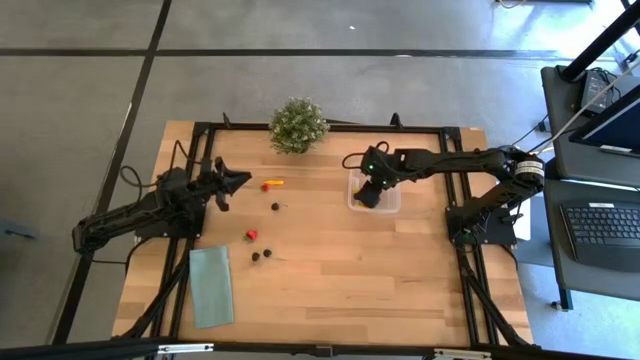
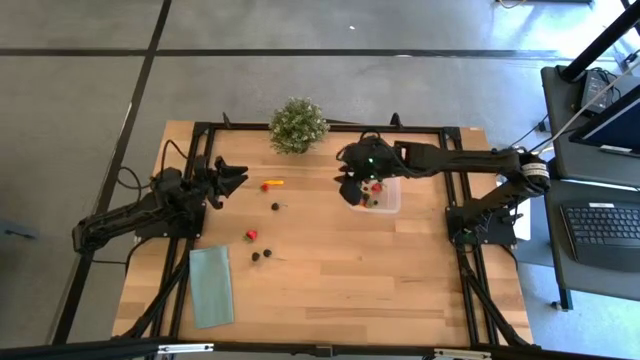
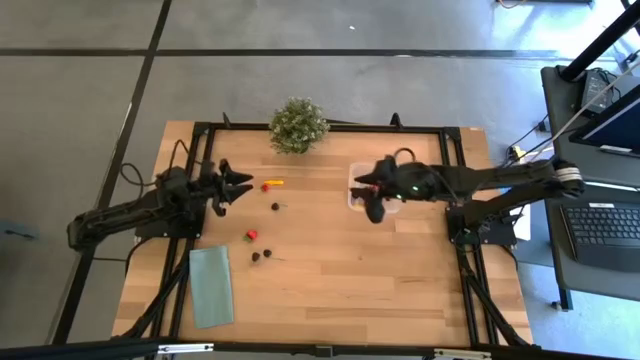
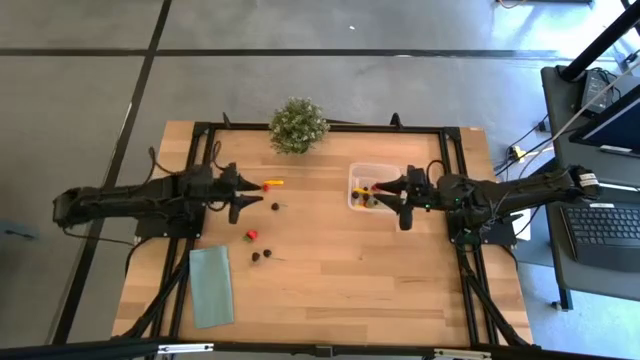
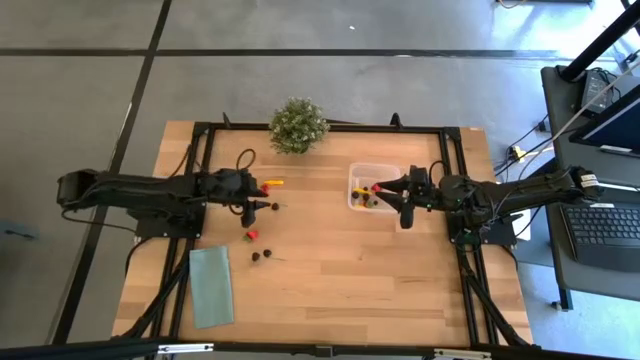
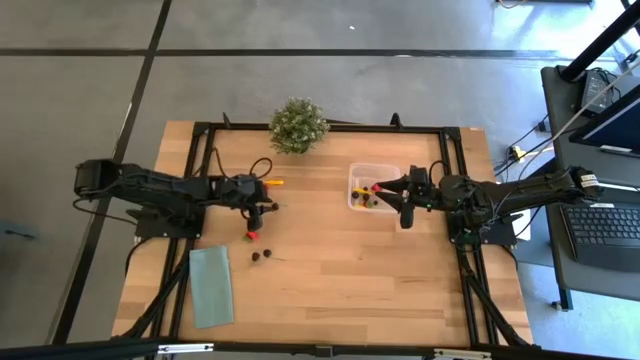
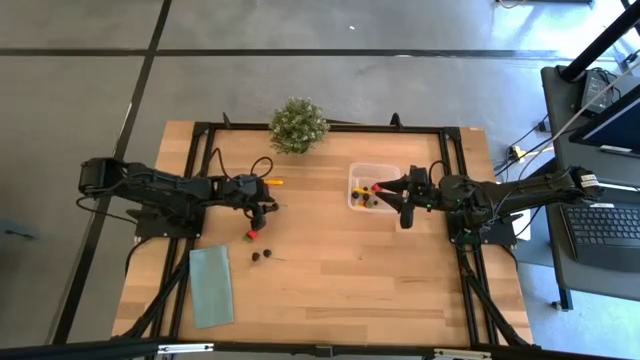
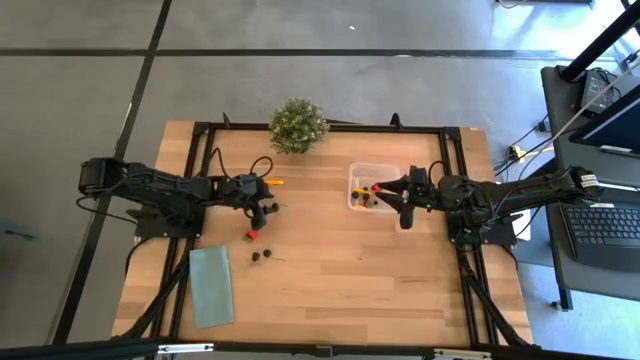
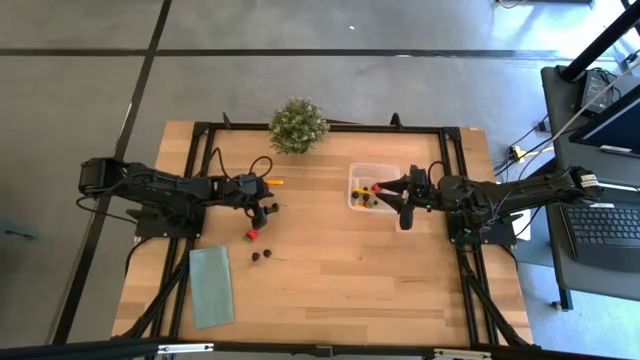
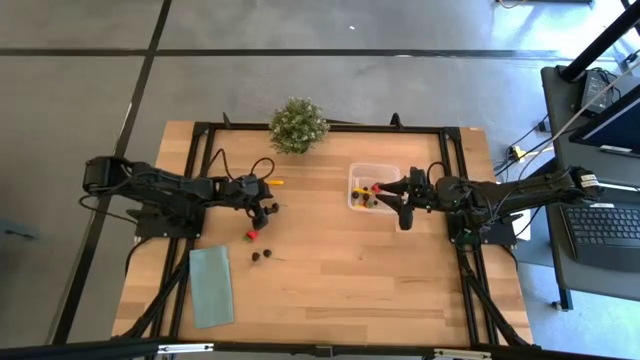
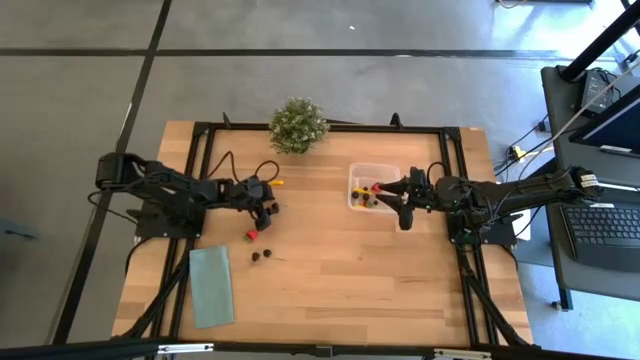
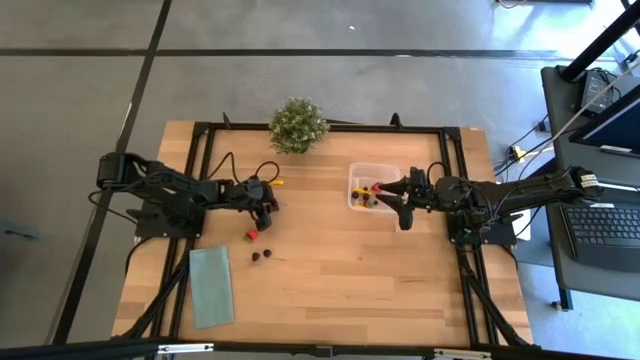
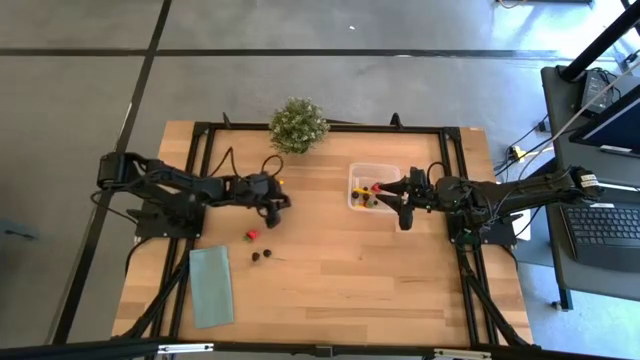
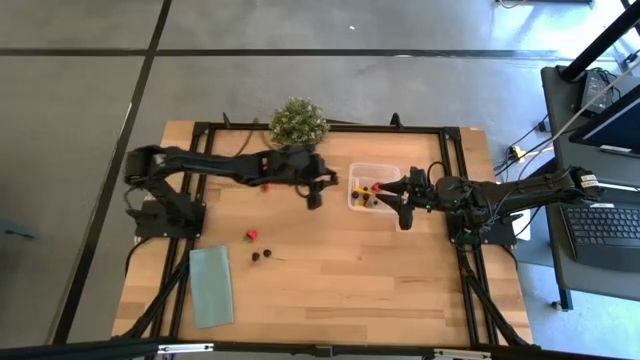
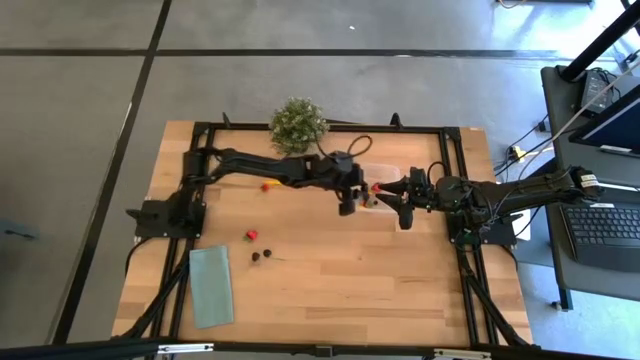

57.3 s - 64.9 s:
Task: Pick and placing Produce into tupperware
Put the top black cherry into the transparent bin

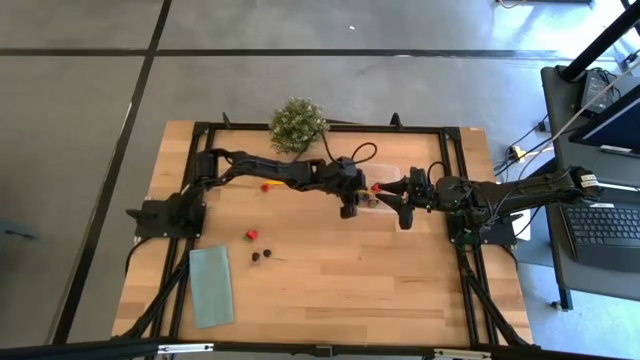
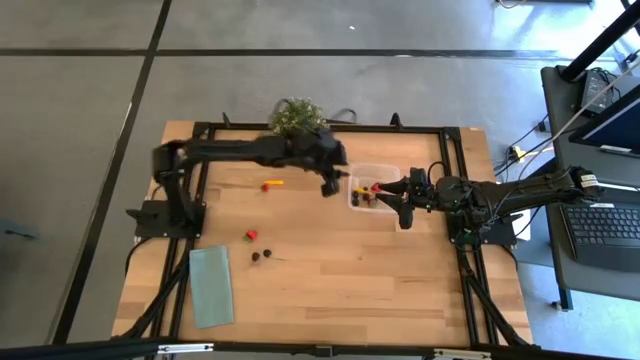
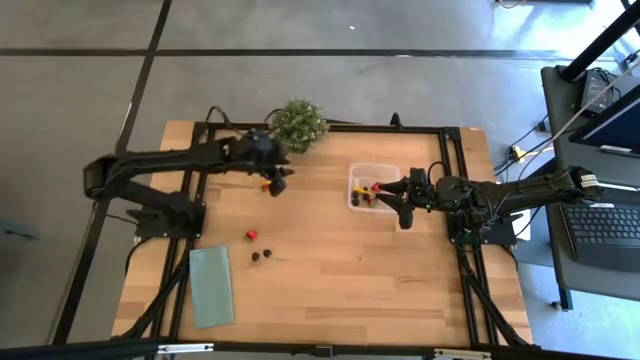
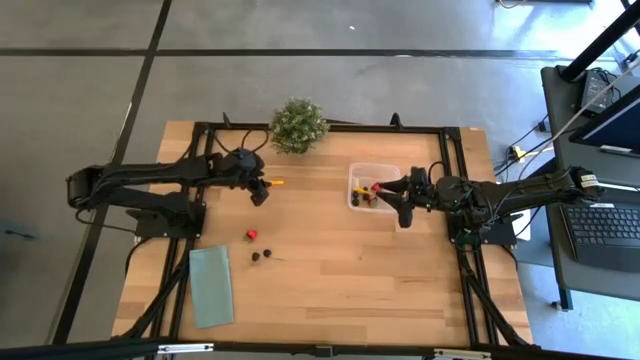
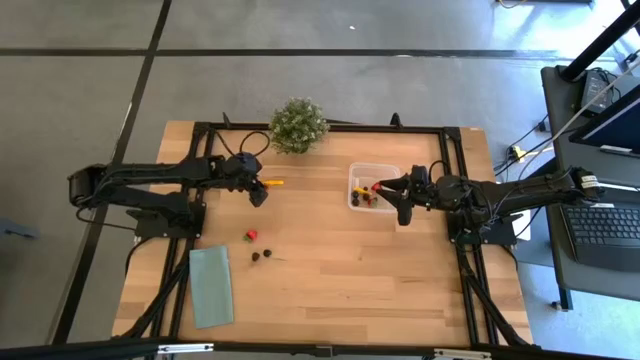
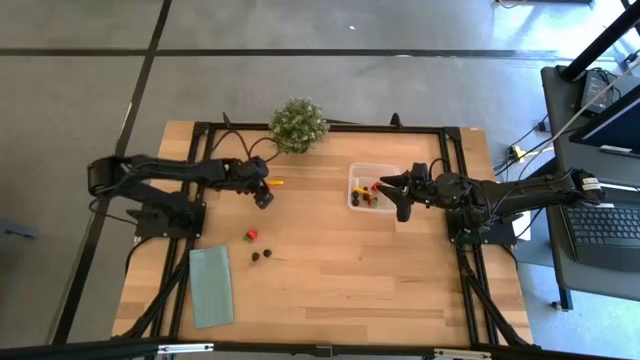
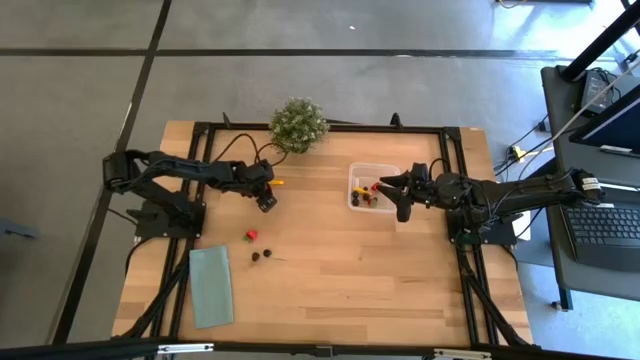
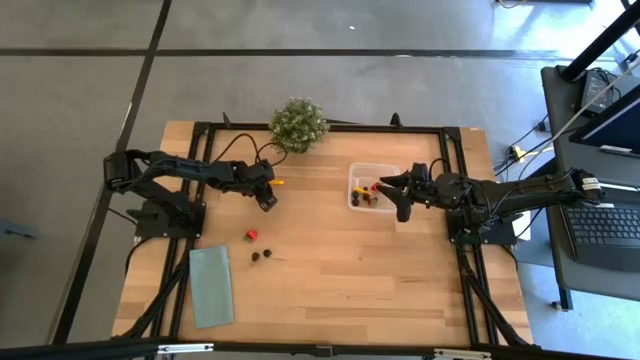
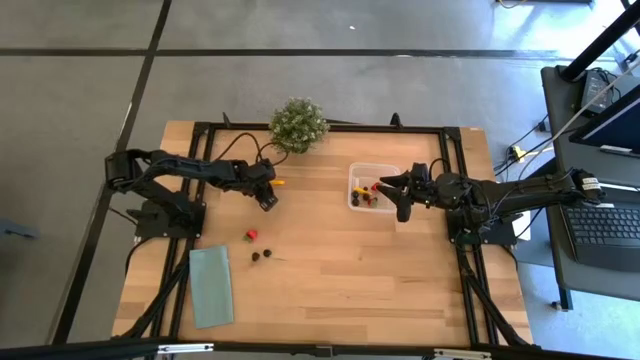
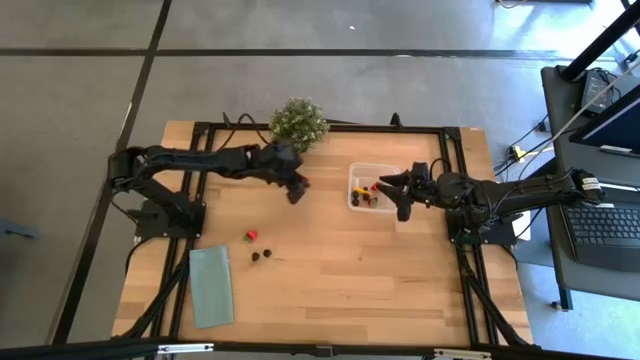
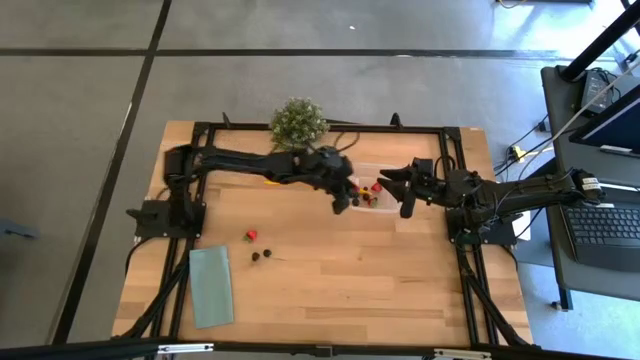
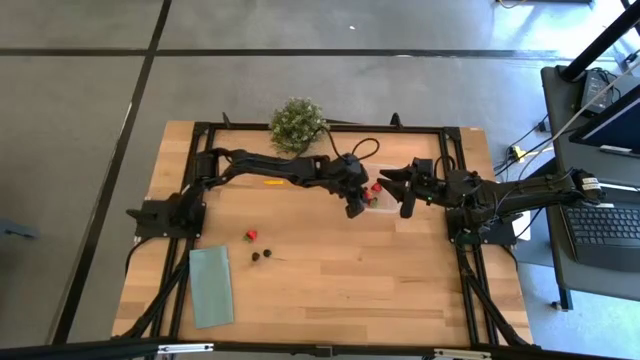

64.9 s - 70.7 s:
Put the top strawberry into the transparent bin

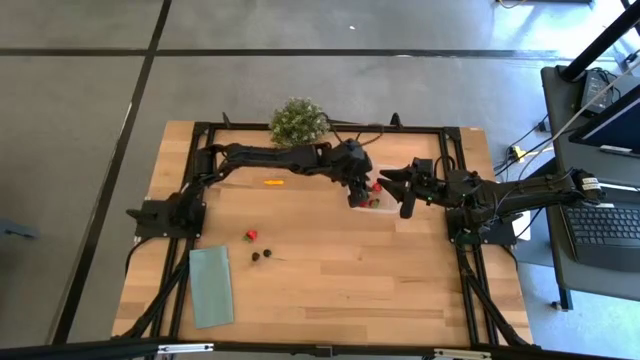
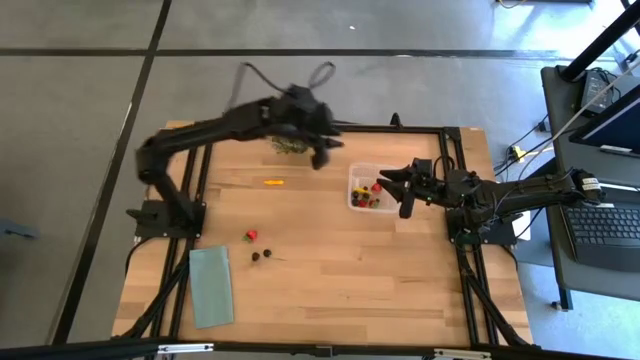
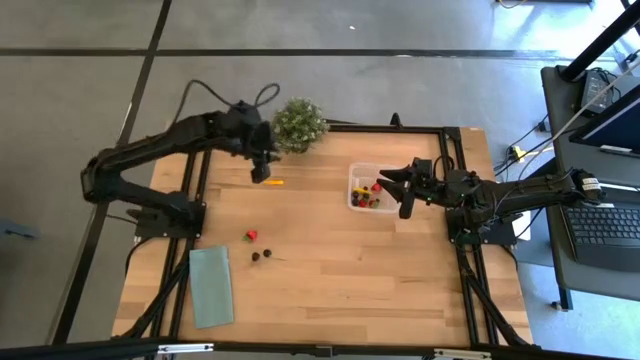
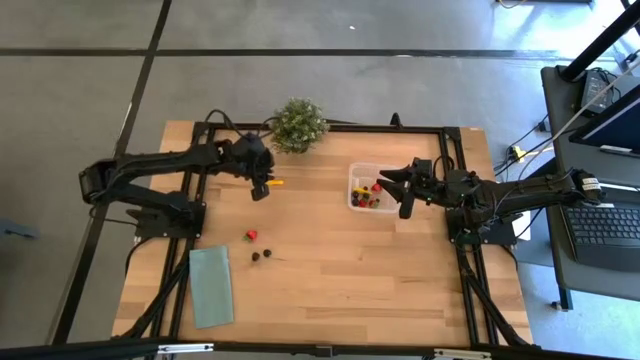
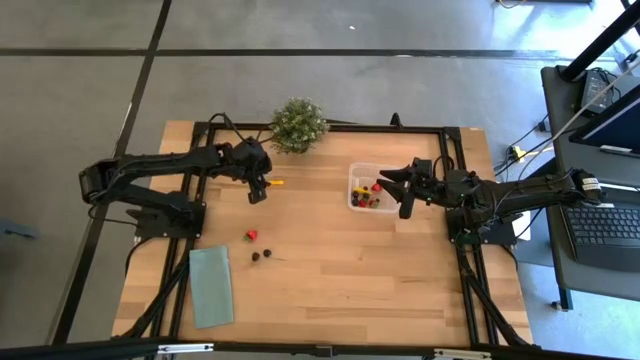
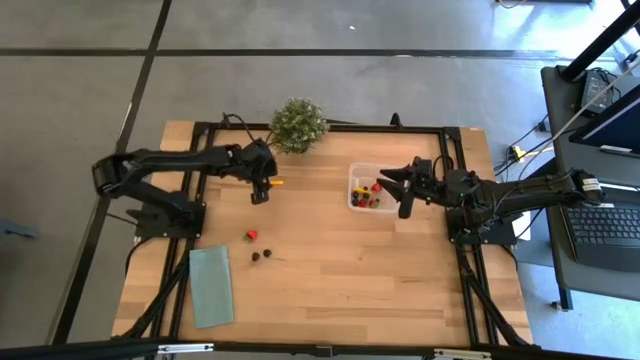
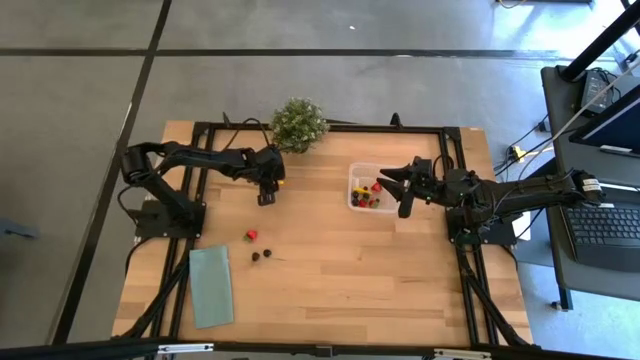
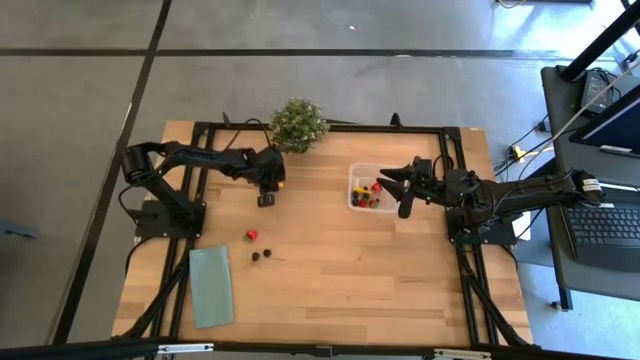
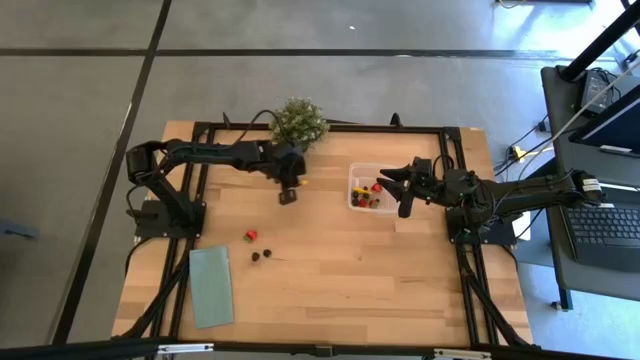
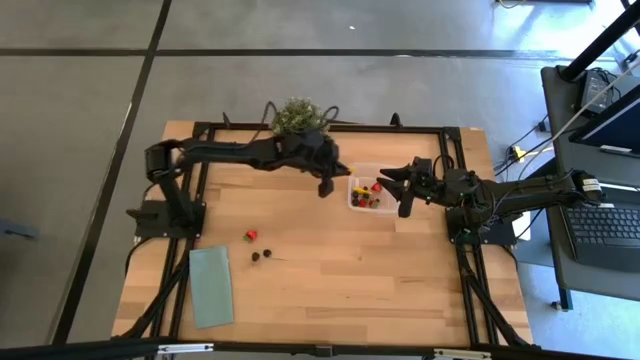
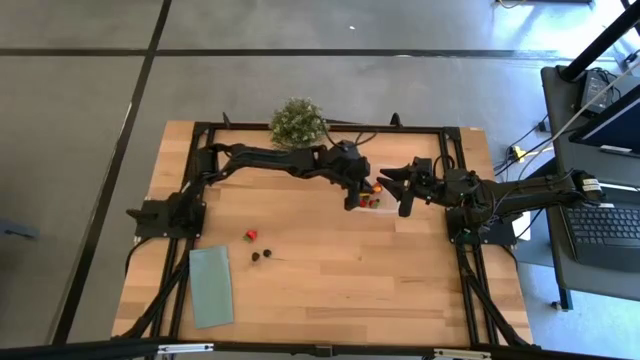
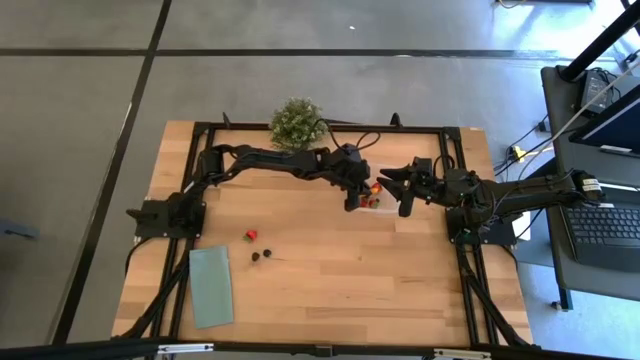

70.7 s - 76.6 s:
Put the sweet corn into the transparent bin

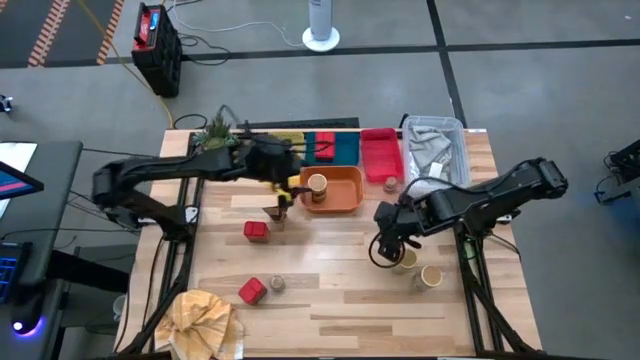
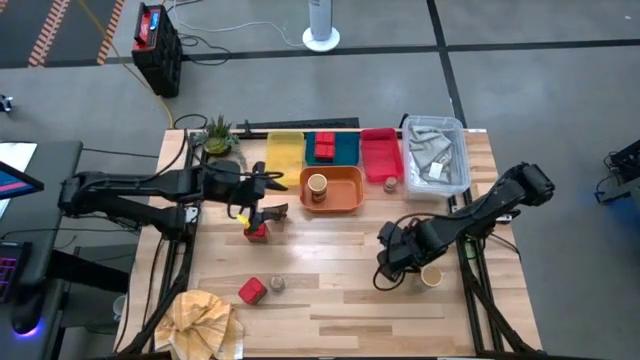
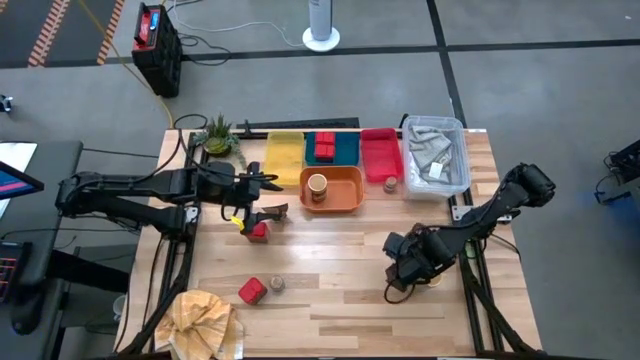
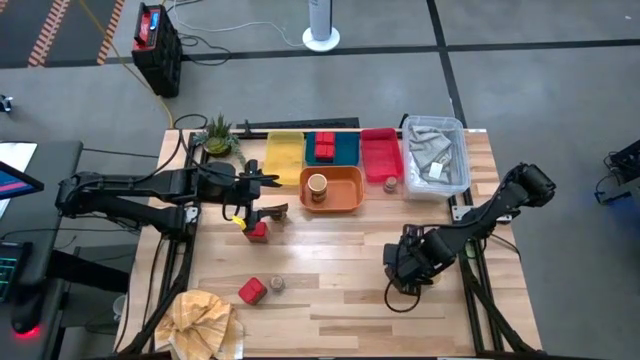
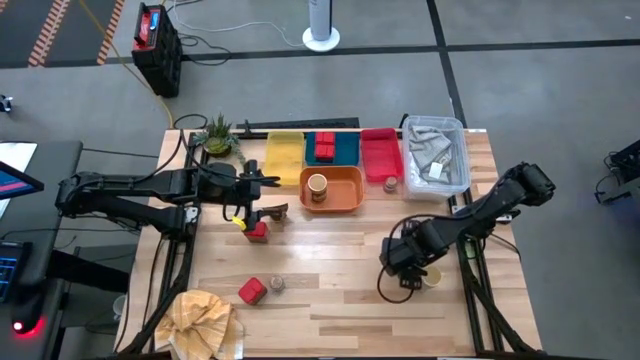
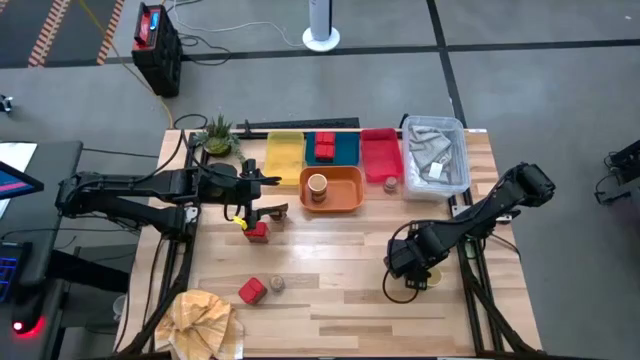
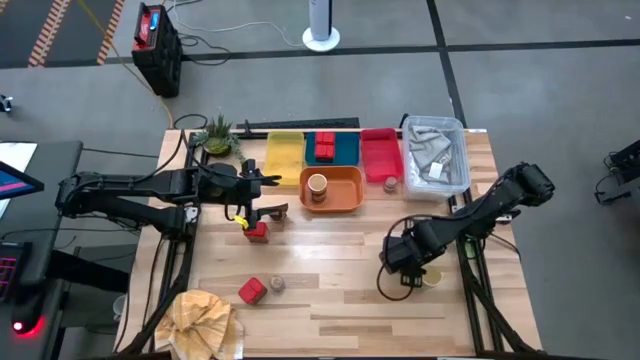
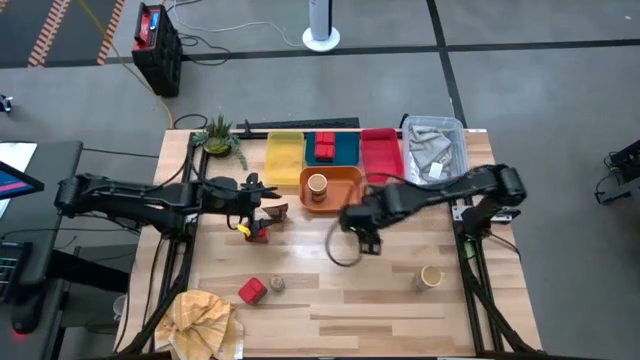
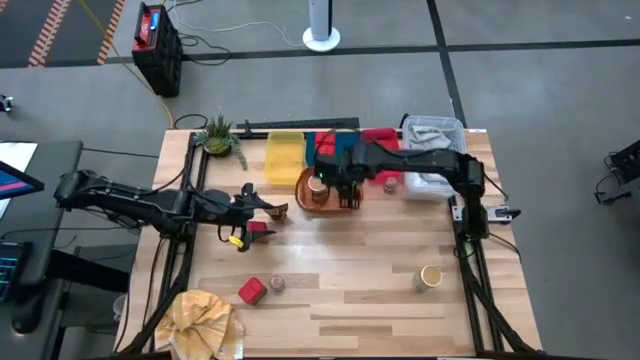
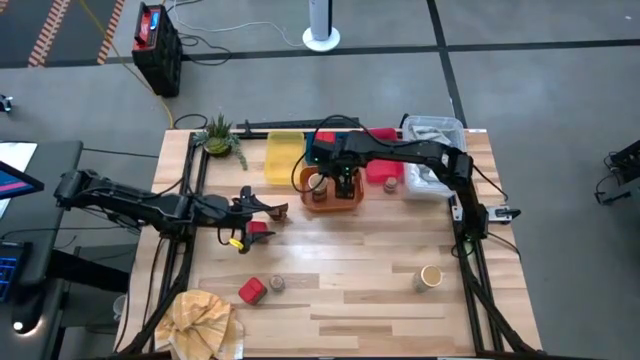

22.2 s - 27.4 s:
Task: Sort spices by type
Put the gold seasoning bottle into the orange bin
